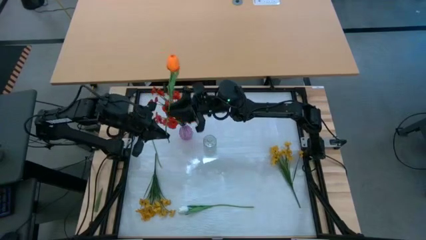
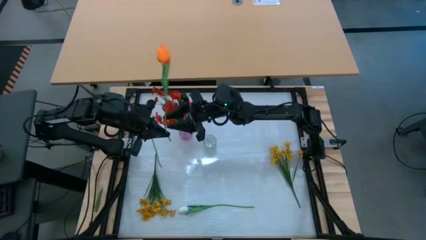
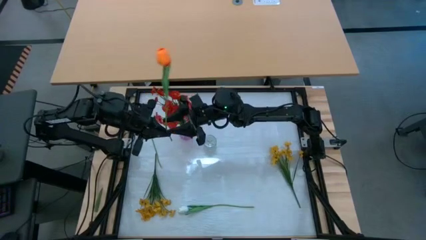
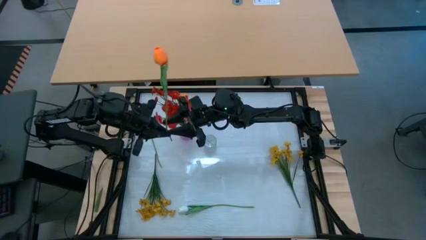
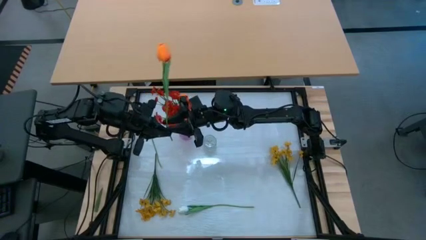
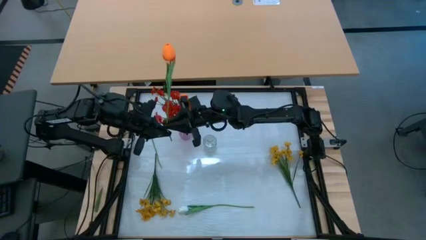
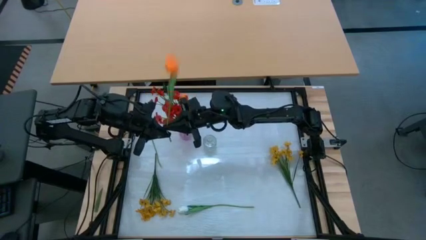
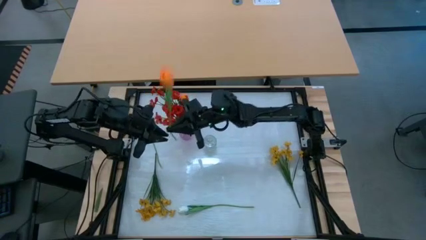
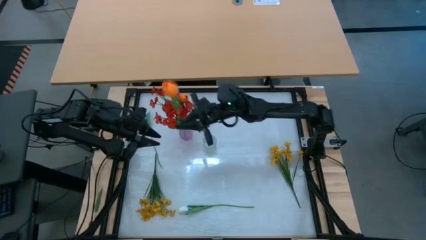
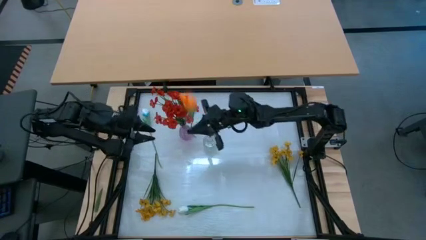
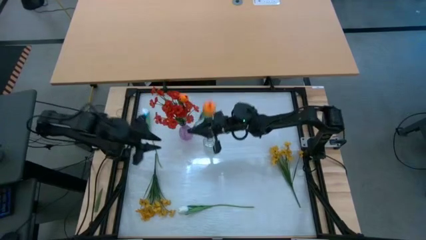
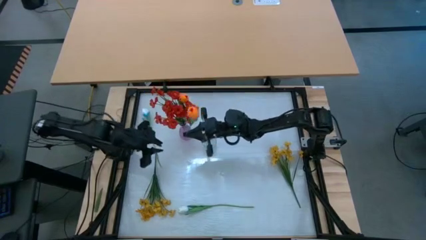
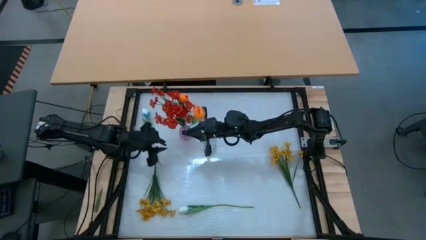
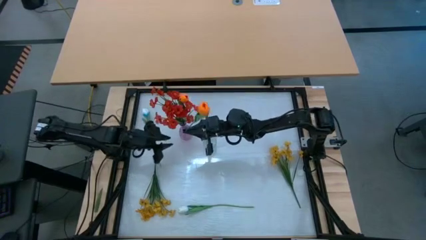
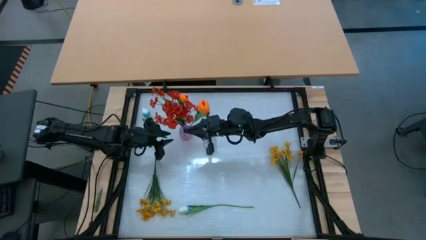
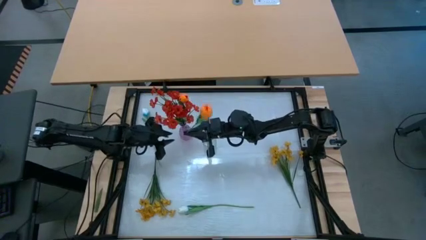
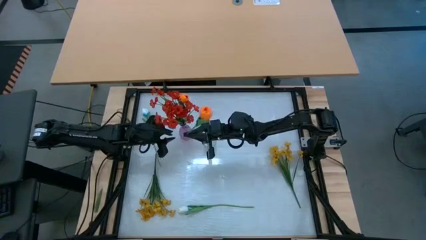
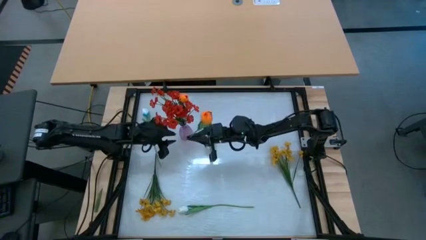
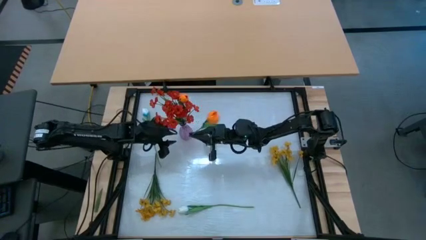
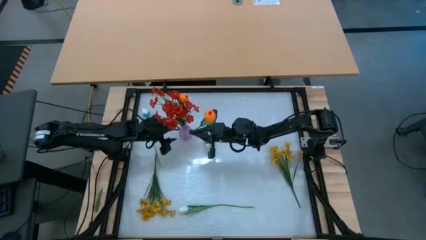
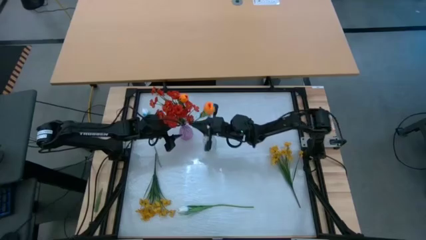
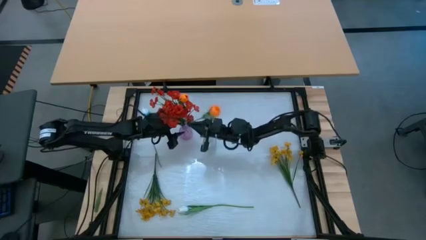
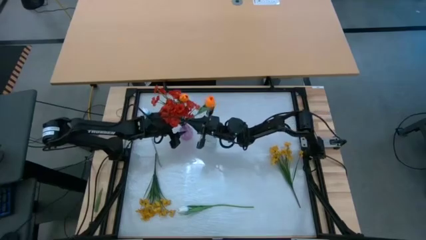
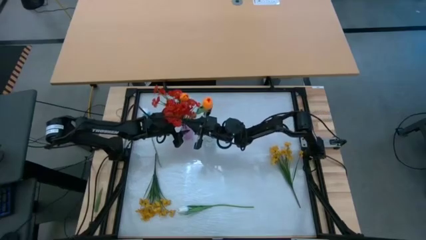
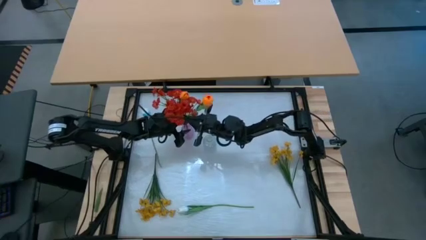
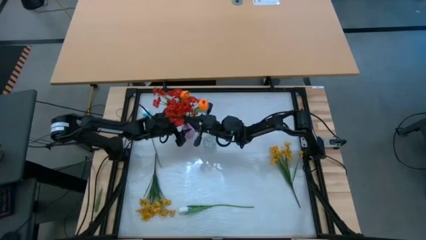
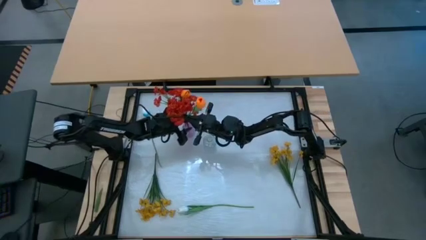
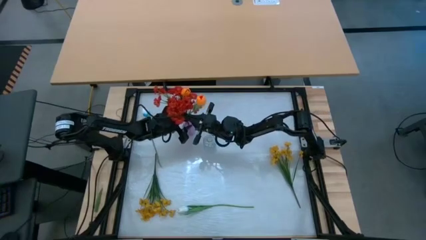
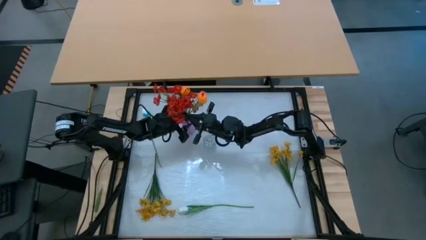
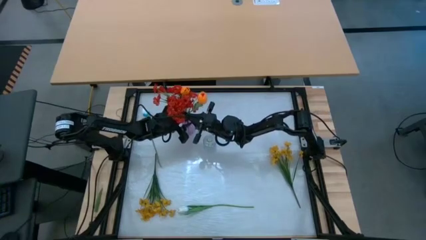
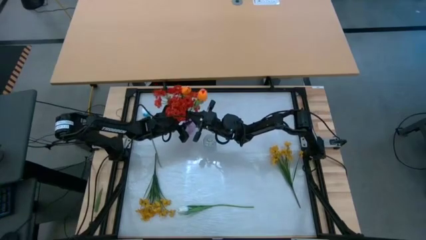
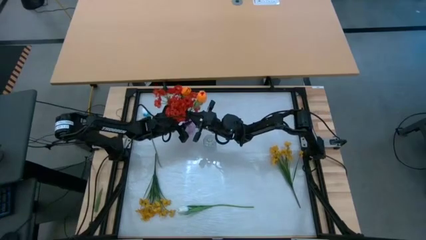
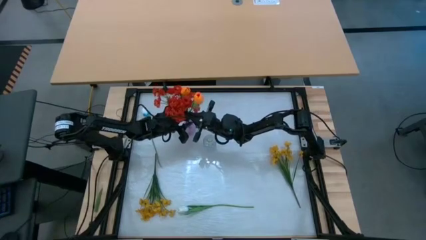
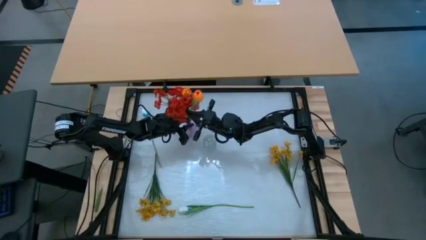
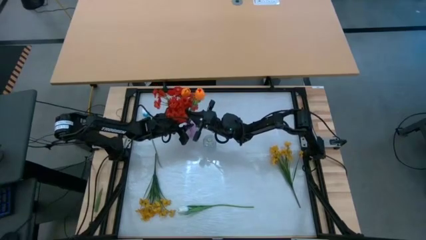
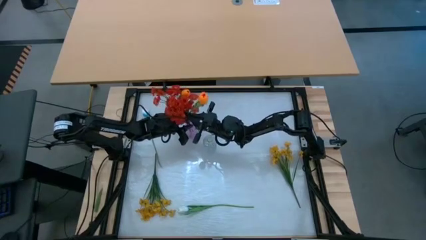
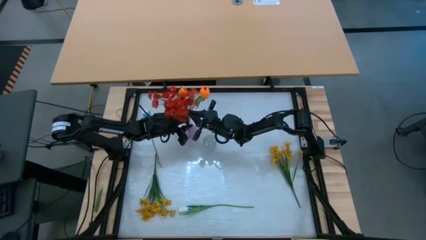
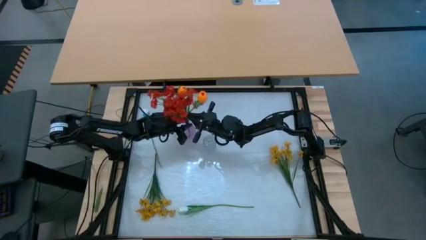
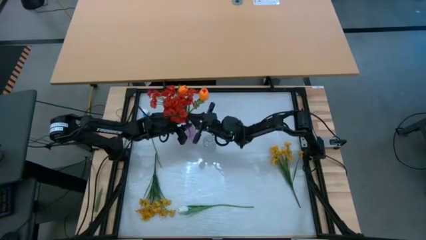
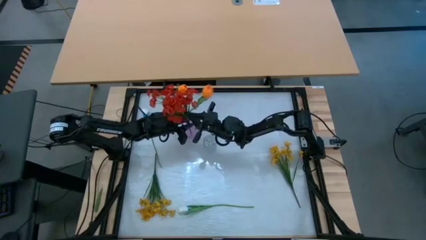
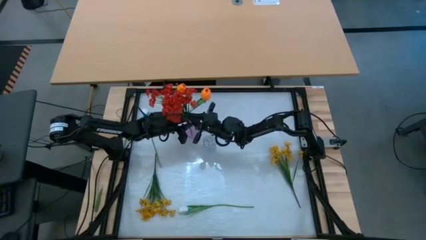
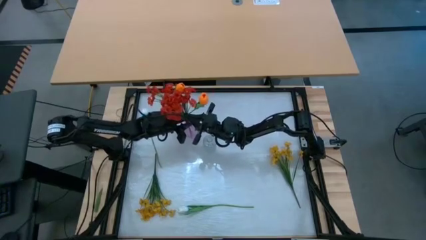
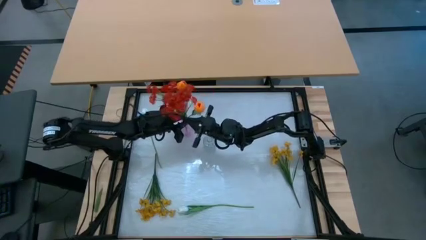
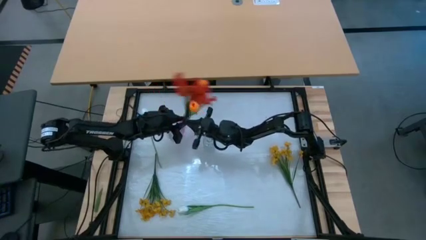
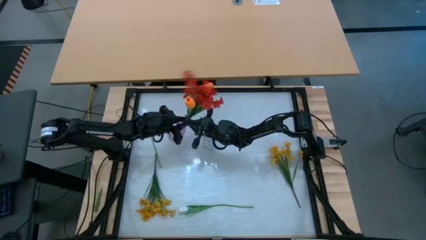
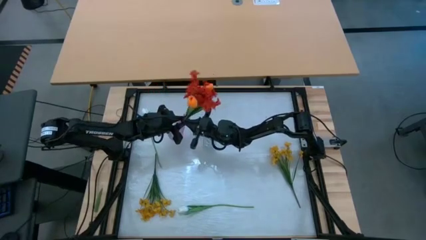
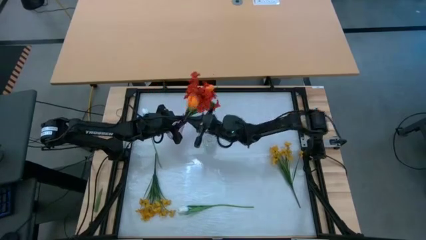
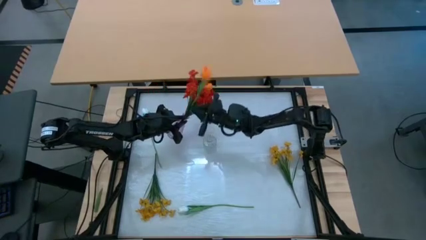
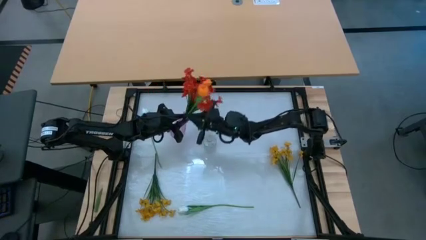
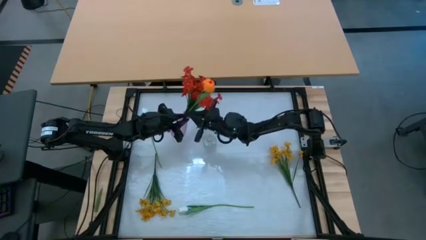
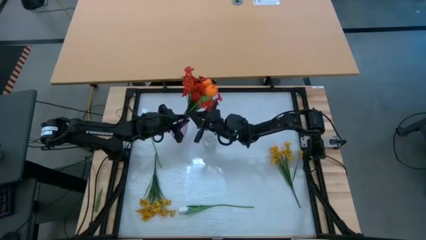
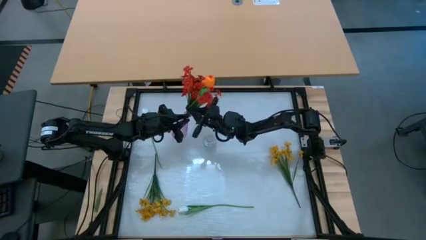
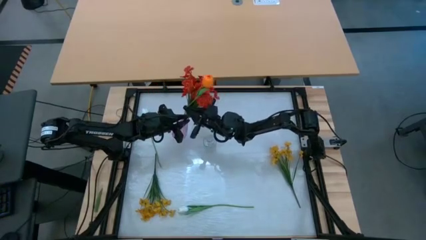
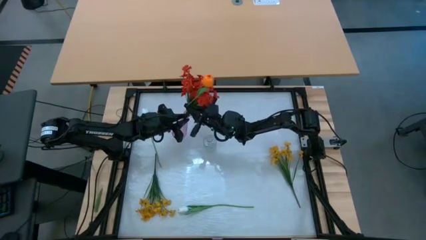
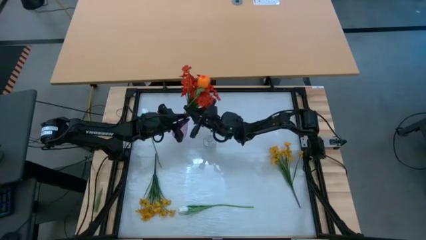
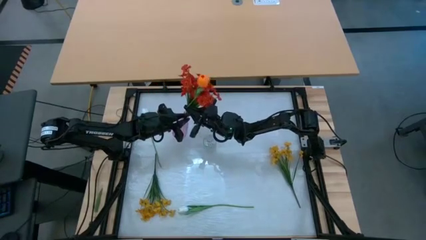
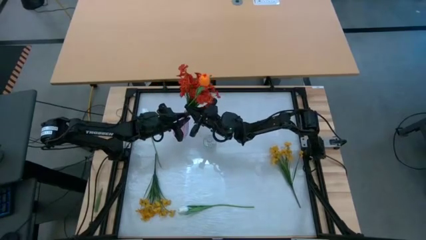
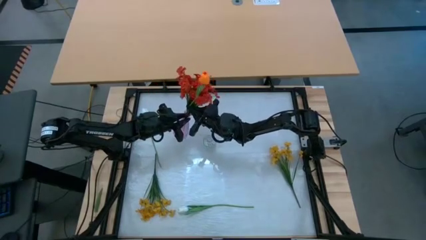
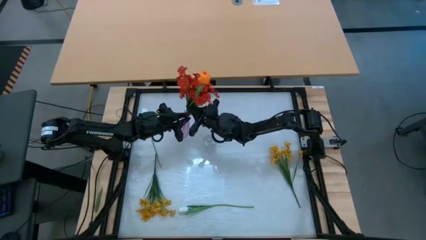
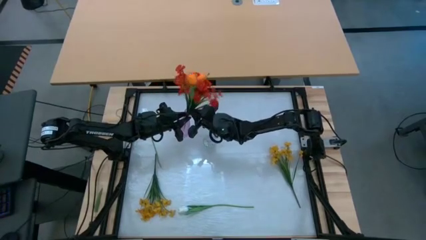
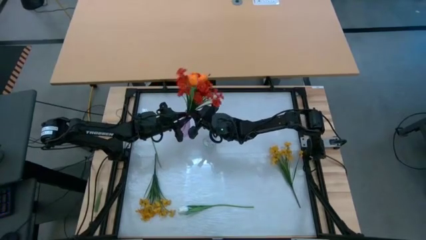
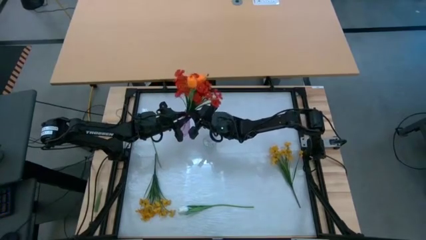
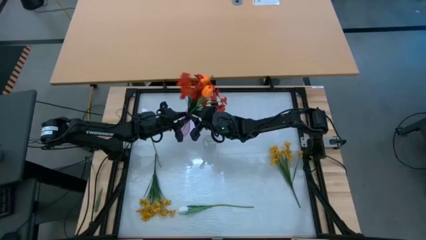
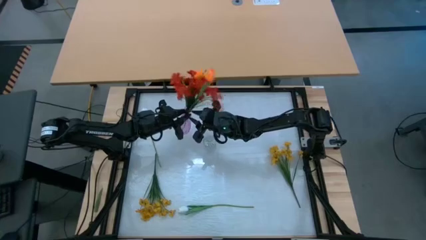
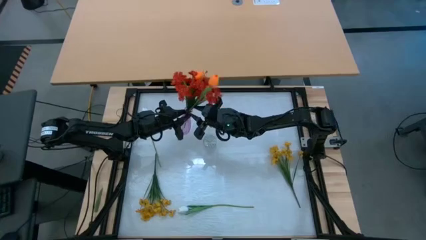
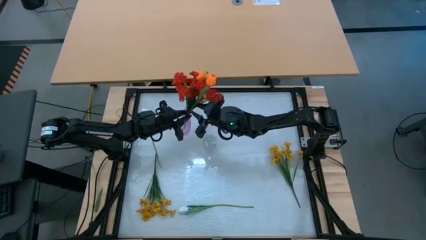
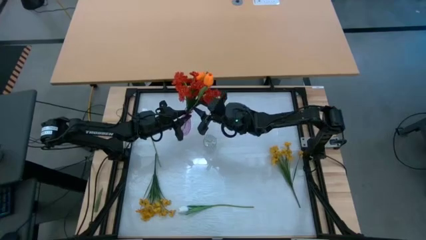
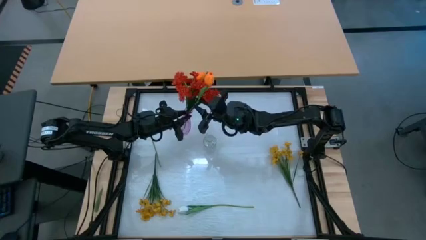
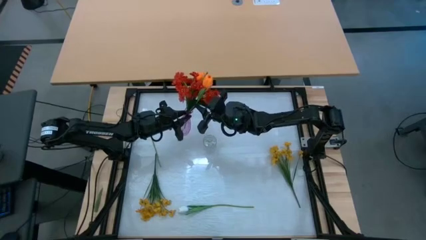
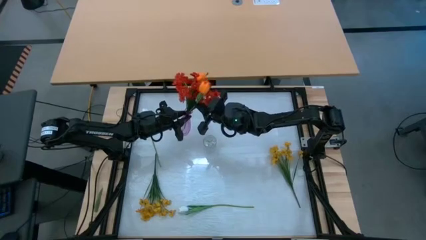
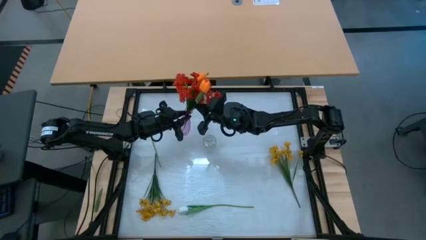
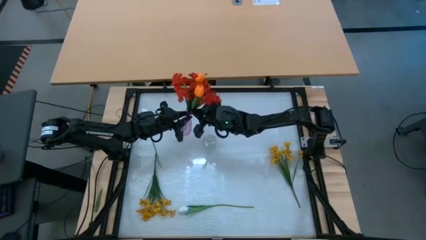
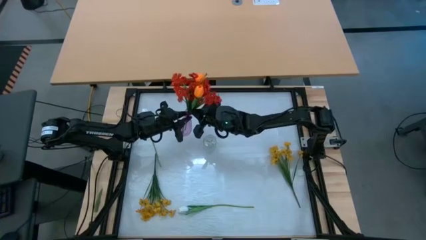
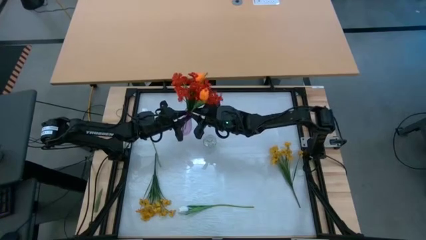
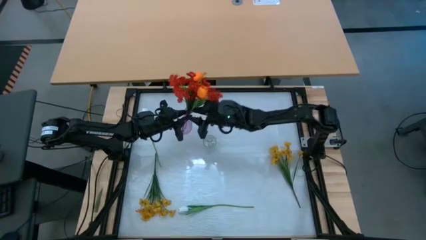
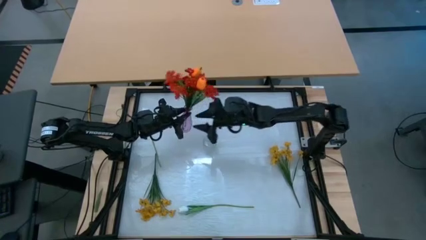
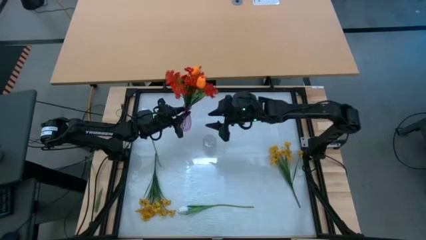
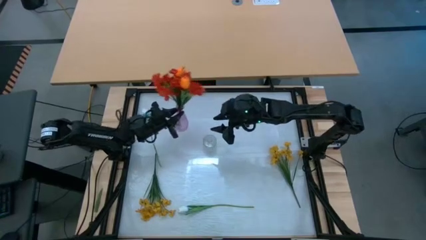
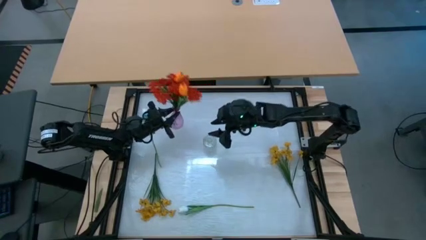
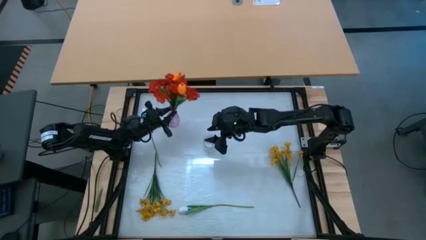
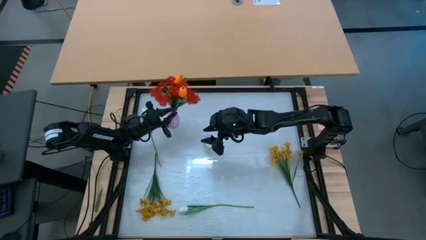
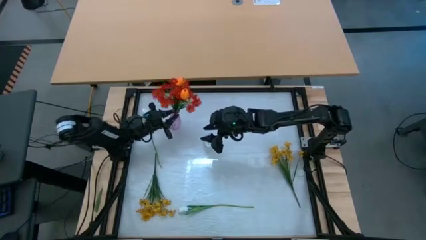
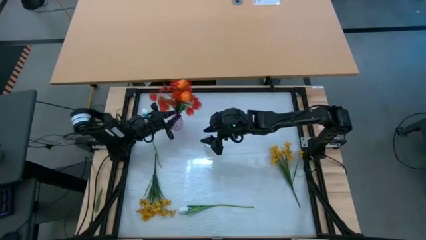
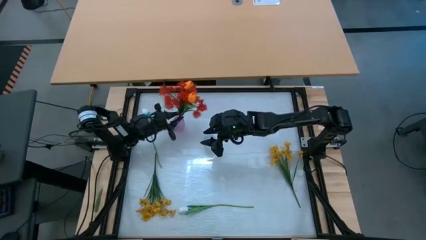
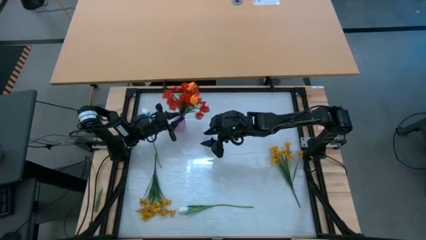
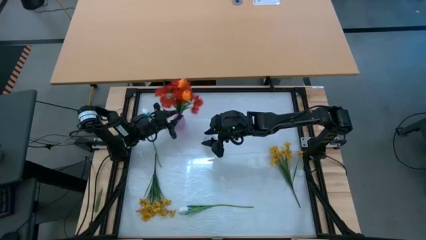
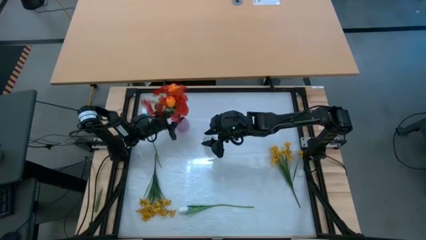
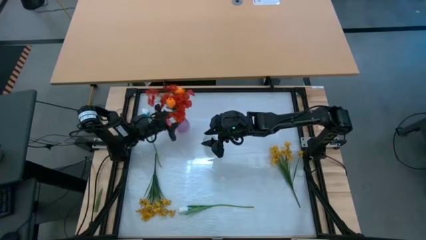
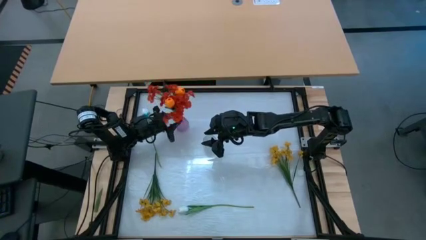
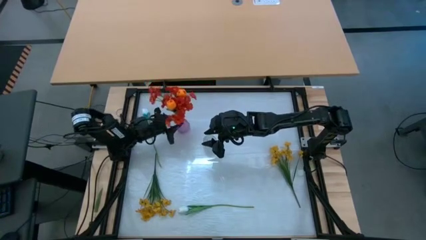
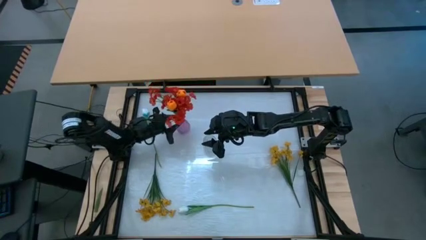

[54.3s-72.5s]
Task: Sort flowers into vase by color
Put the orange tulip into the violet vase
